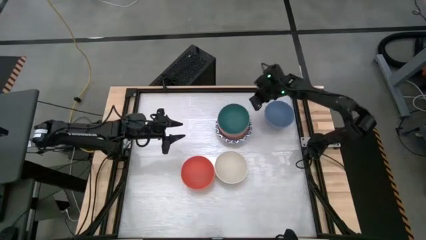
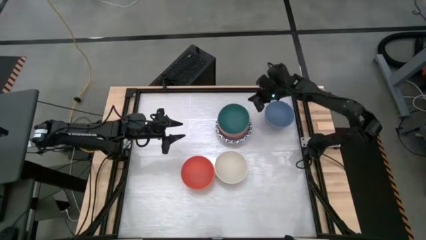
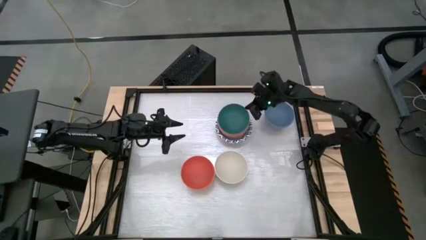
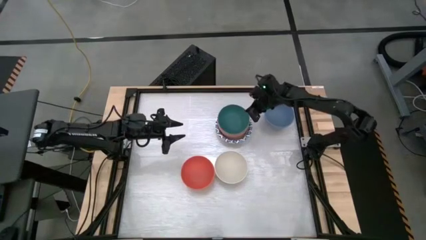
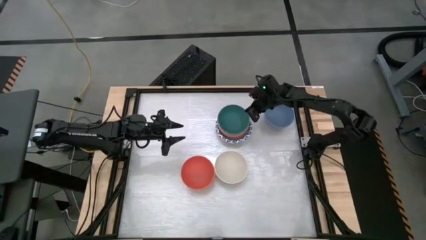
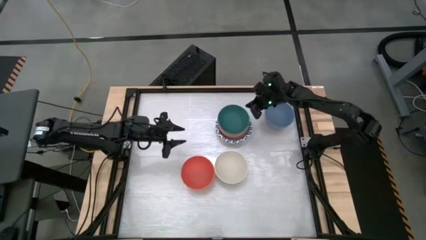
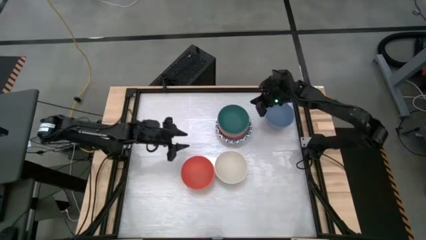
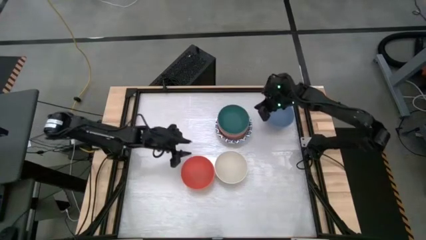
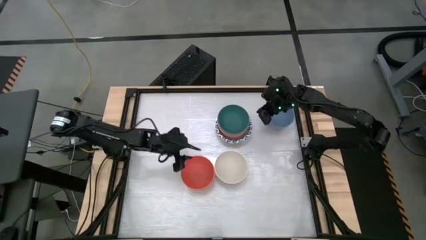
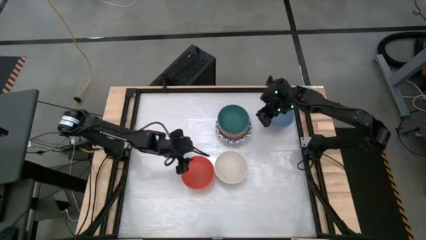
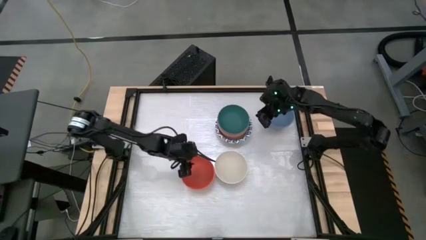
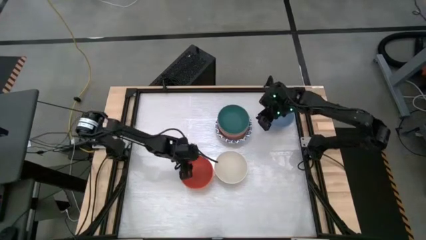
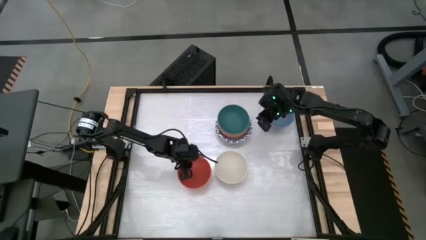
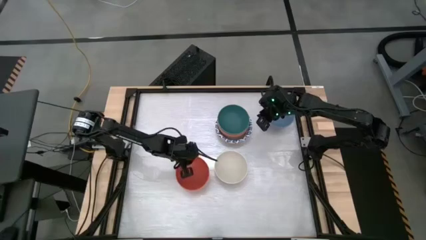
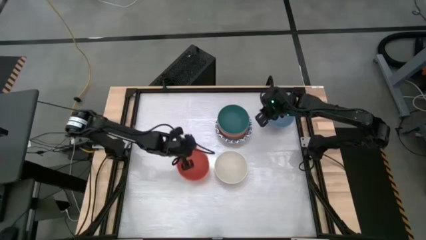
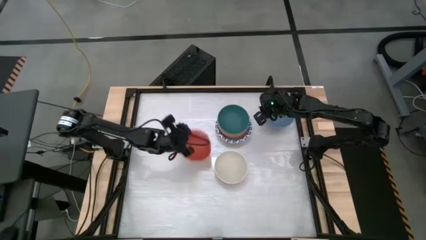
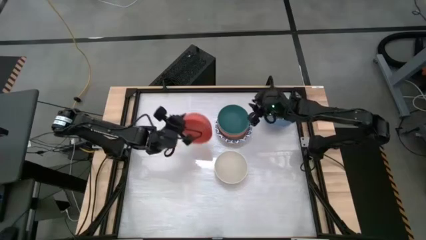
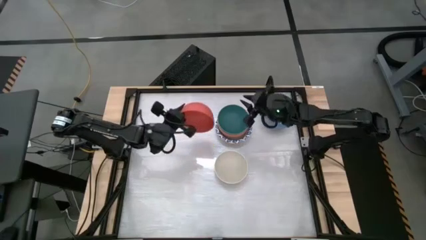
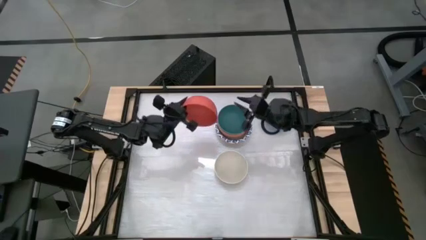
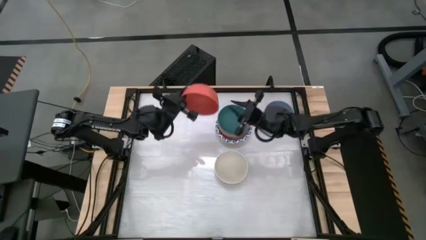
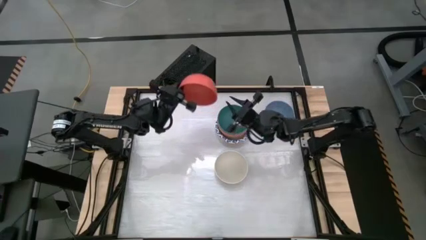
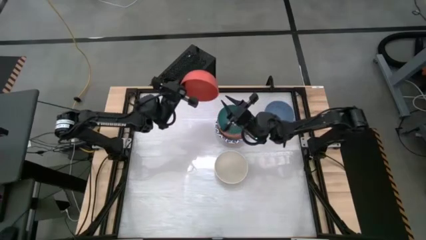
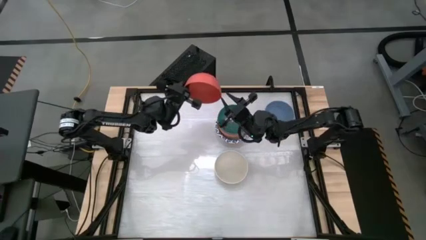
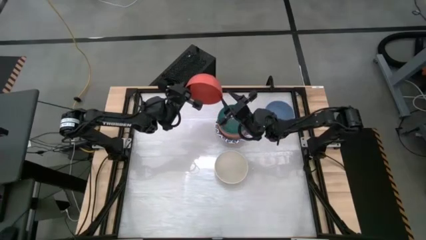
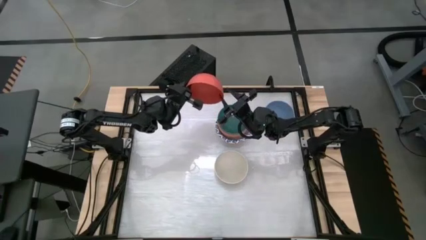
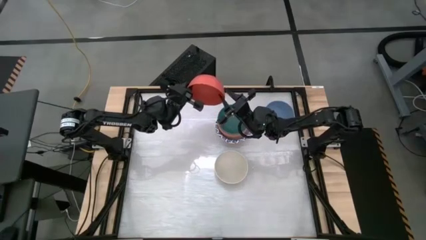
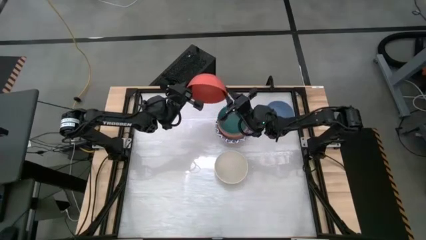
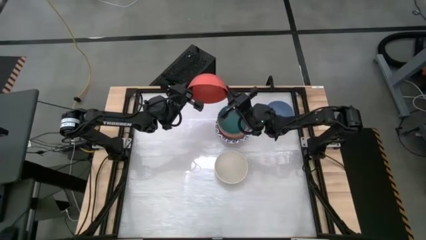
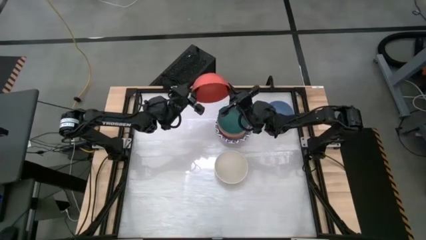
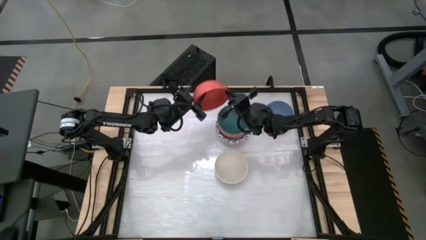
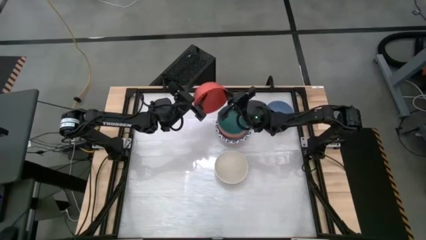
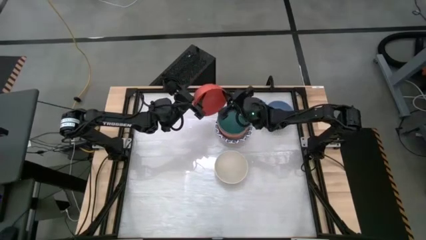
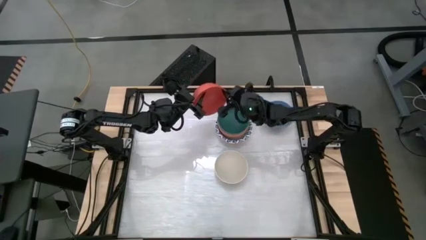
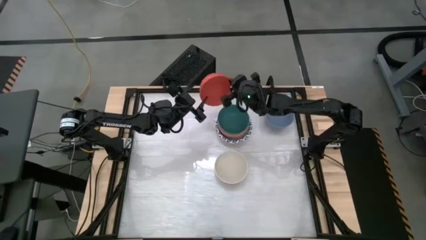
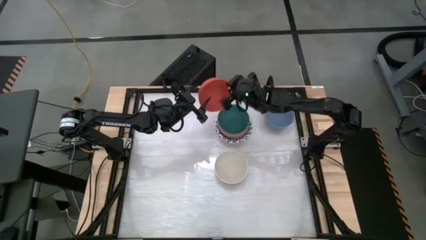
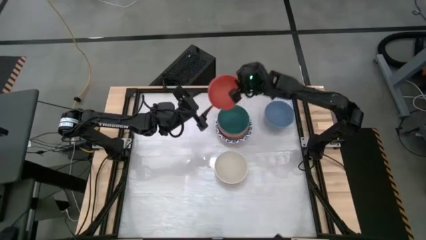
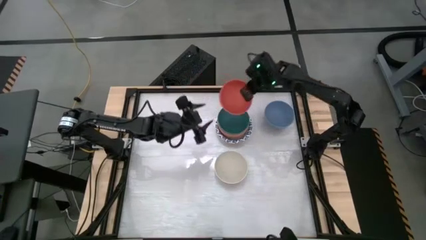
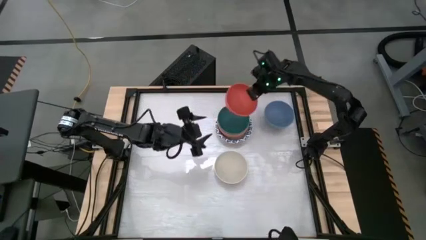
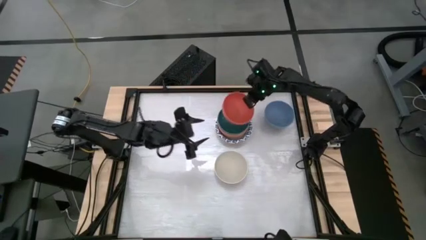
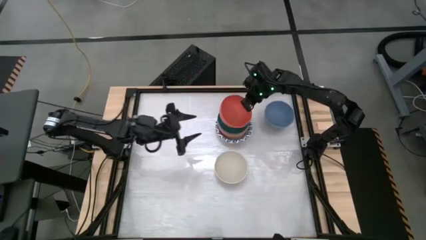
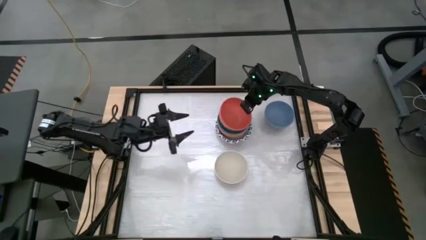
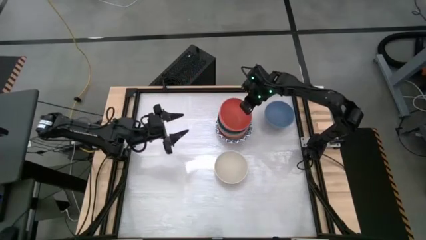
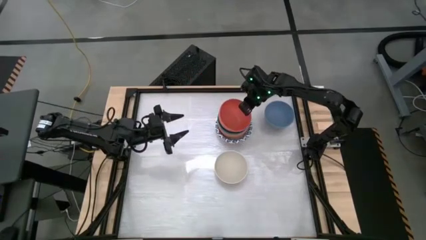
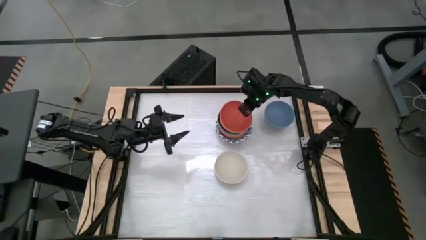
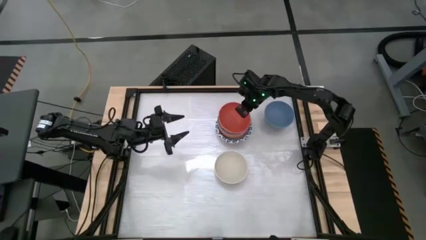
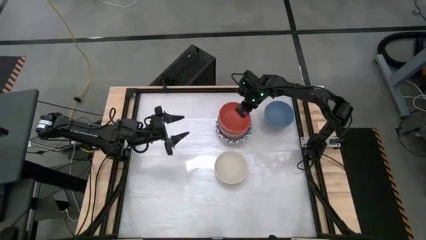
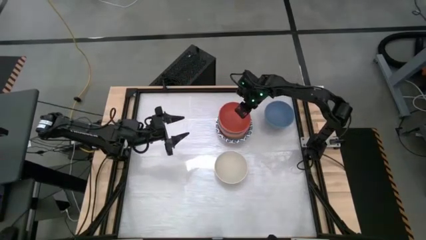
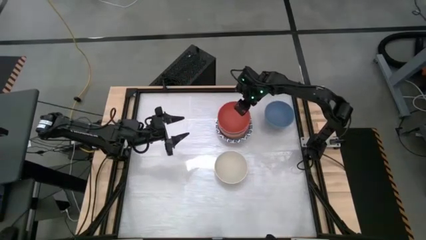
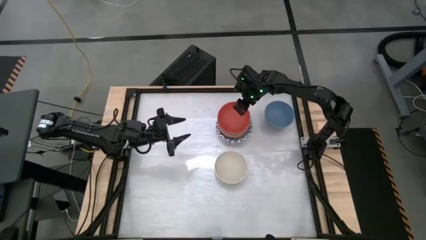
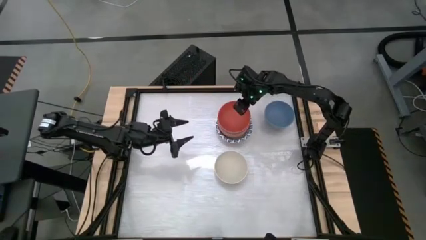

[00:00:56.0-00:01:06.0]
Task: Nest bowls inside each other by size order
Stack the orange bowl on top of the green bowl

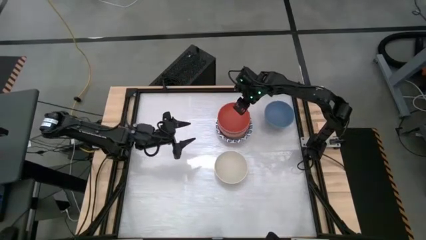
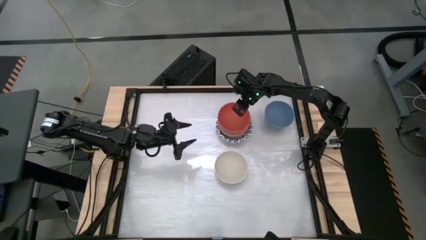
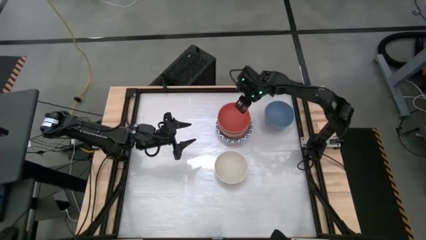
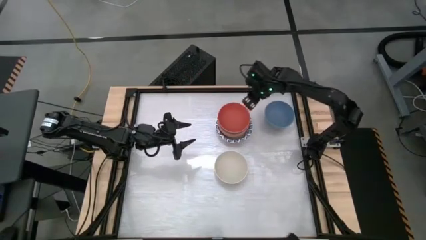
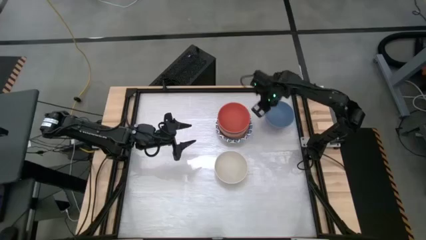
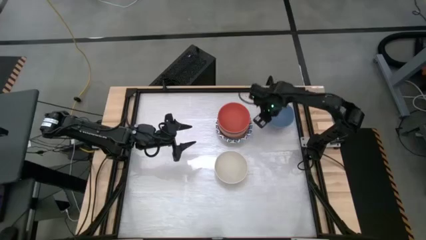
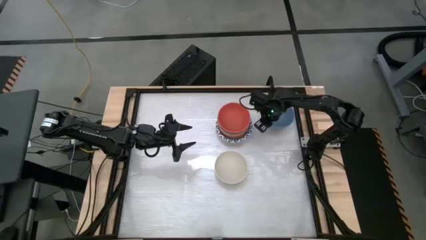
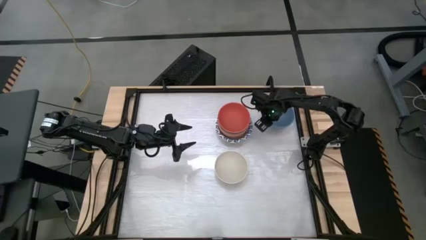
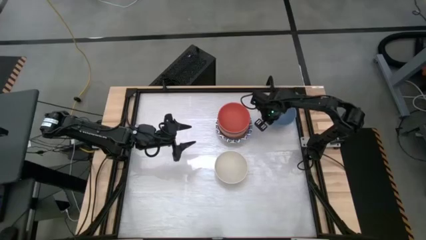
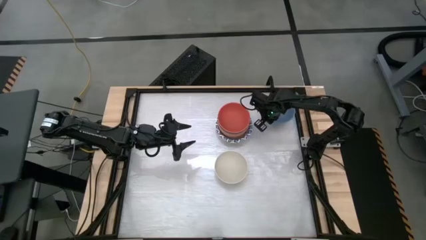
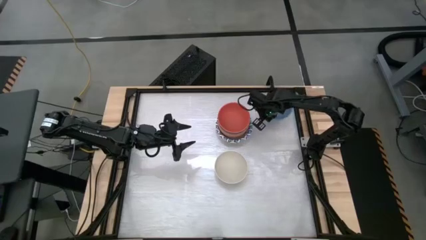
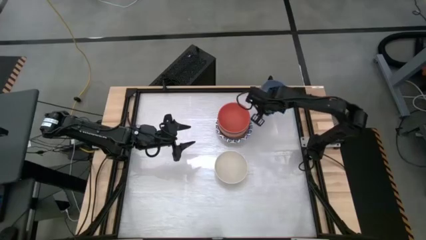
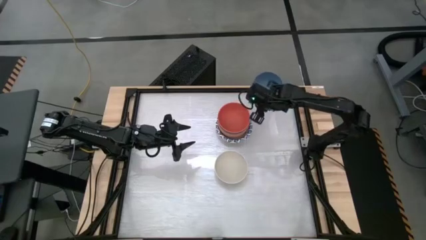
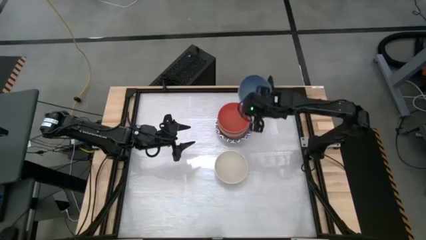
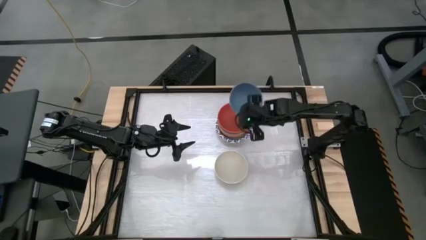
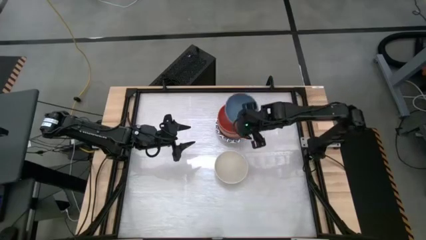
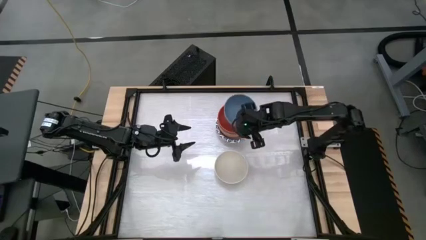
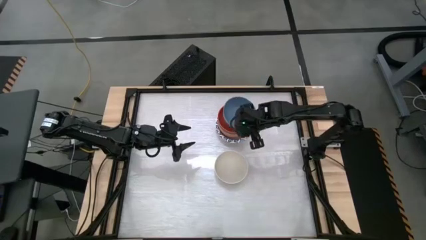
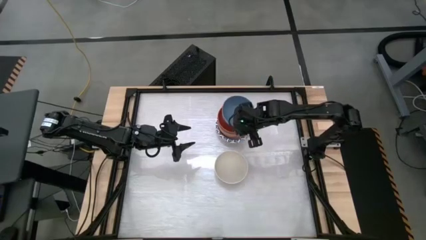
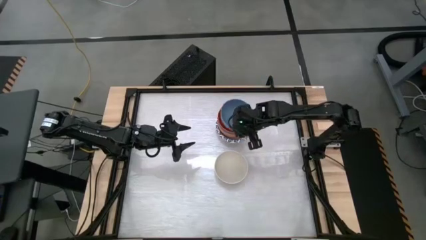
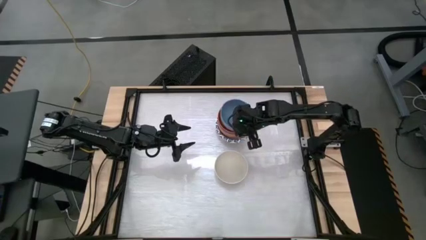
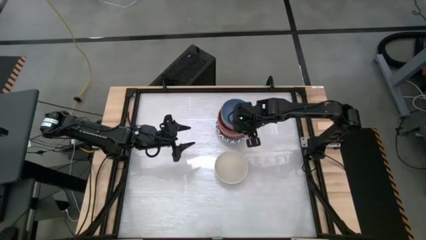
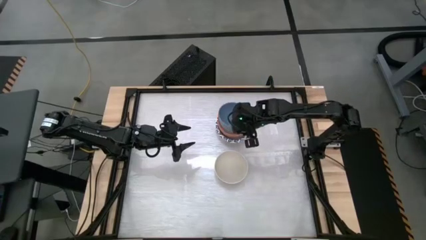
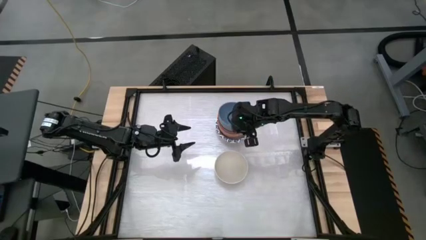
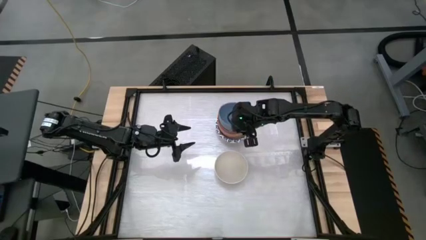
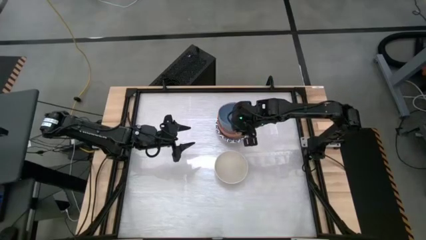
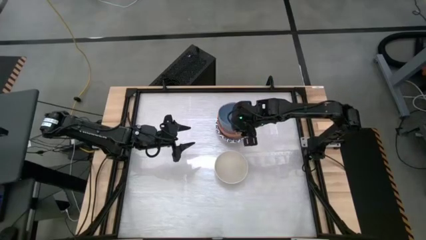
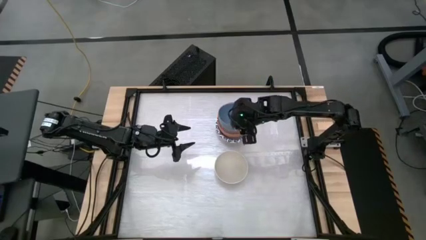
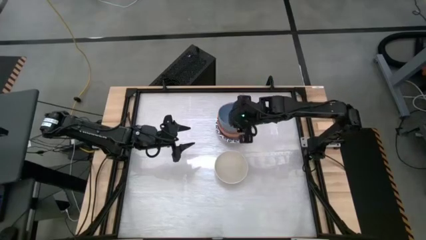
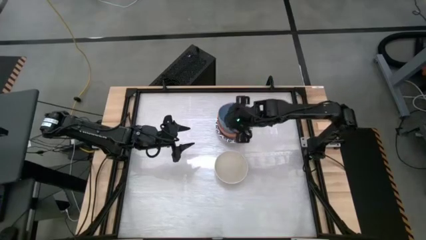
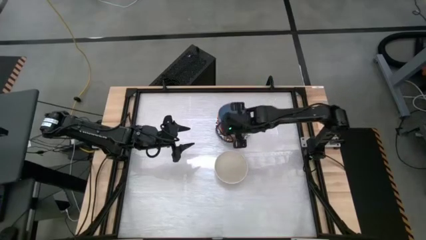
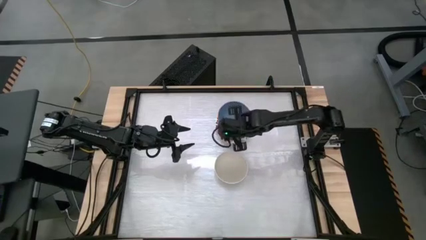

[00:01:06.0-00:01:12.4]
Stack the blue bowl on top of the orange bowl
